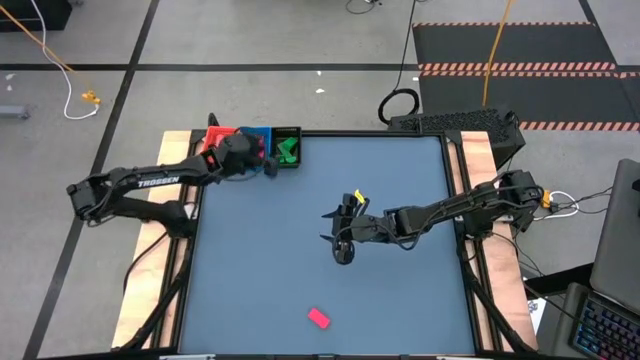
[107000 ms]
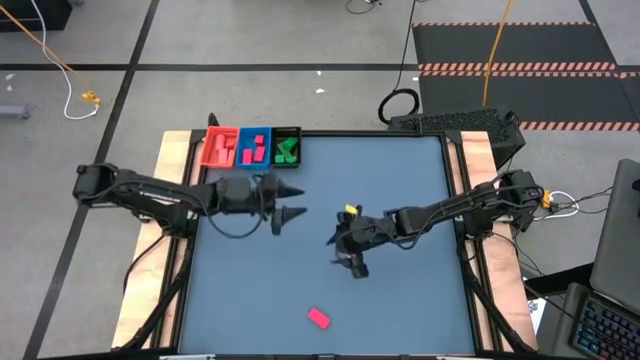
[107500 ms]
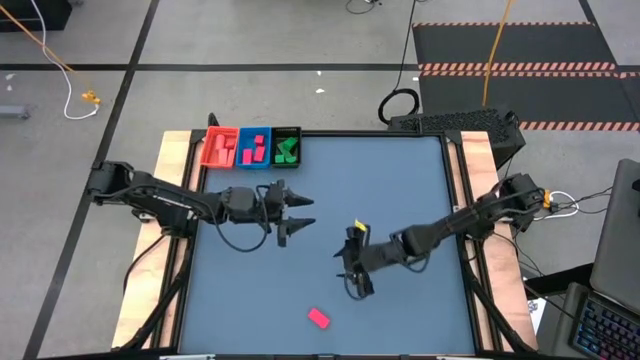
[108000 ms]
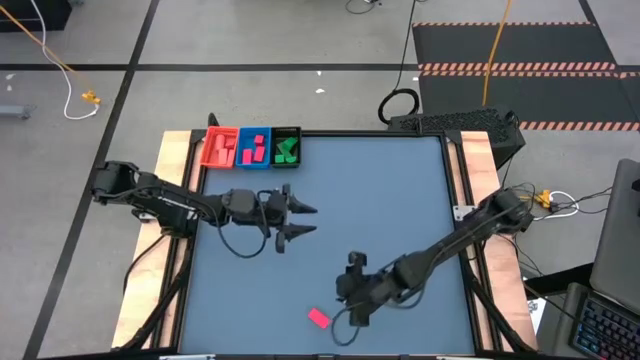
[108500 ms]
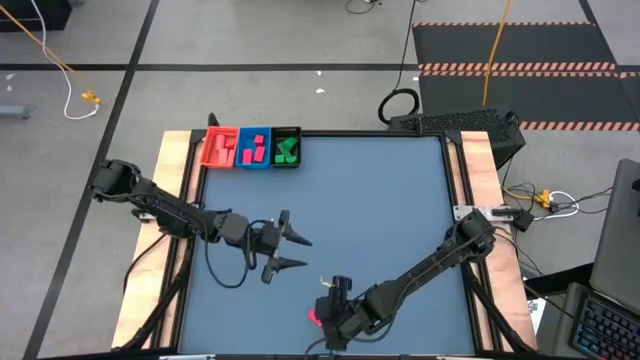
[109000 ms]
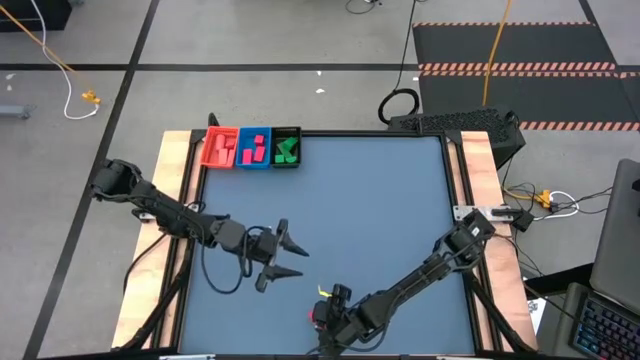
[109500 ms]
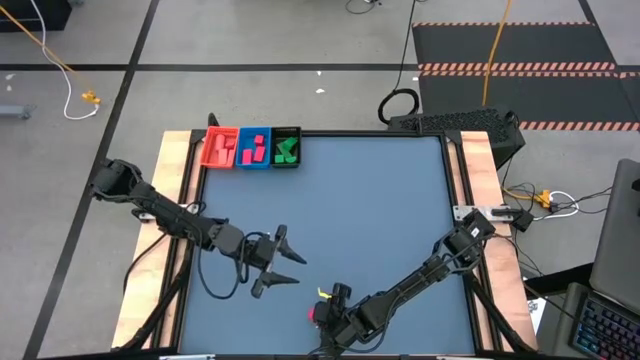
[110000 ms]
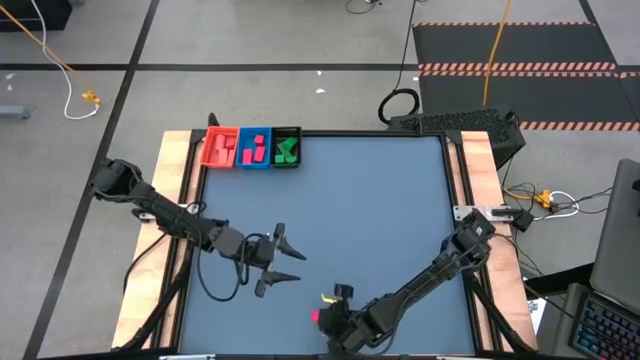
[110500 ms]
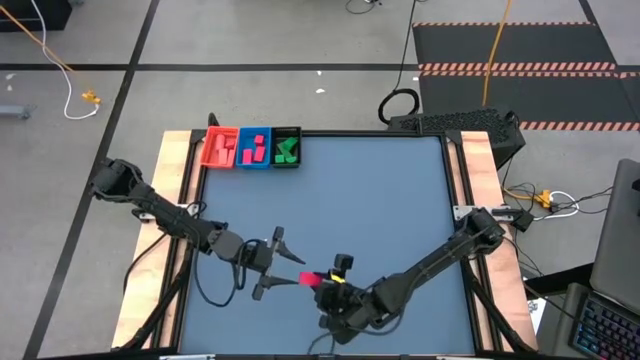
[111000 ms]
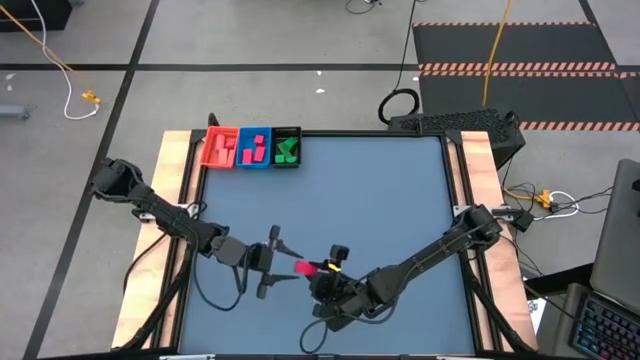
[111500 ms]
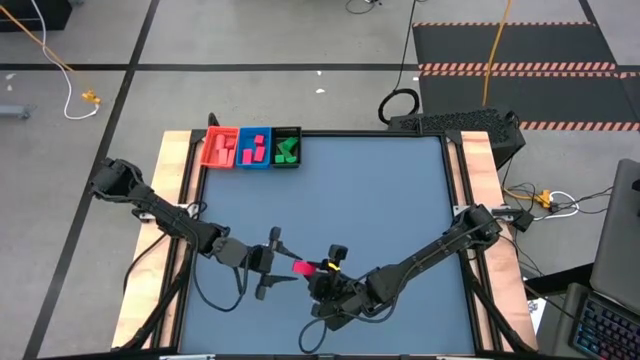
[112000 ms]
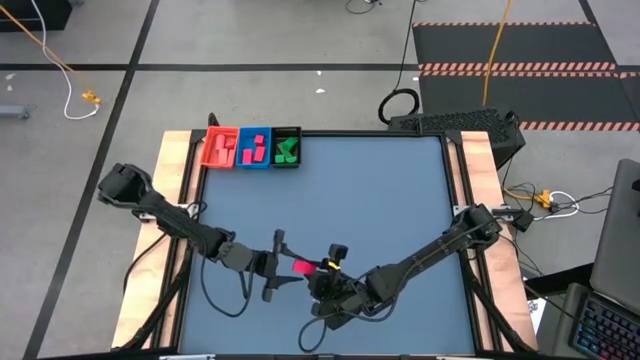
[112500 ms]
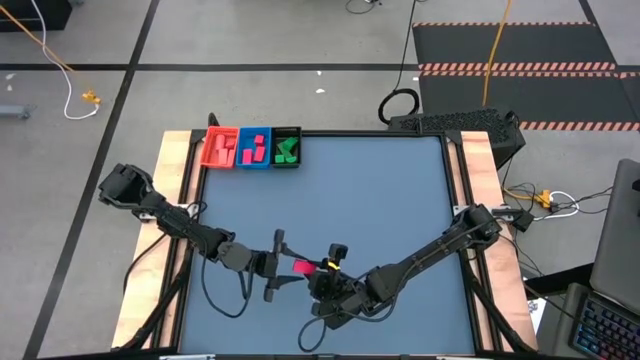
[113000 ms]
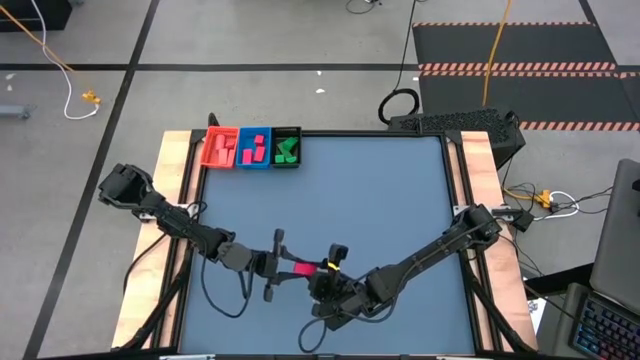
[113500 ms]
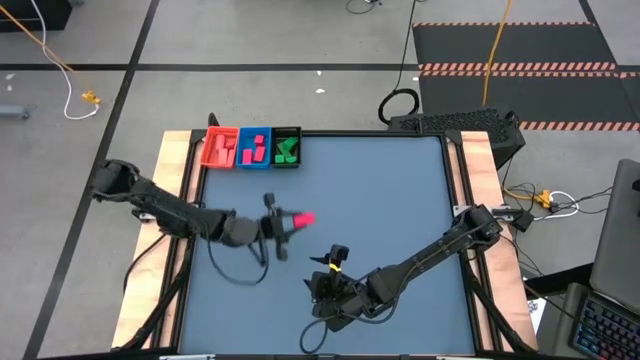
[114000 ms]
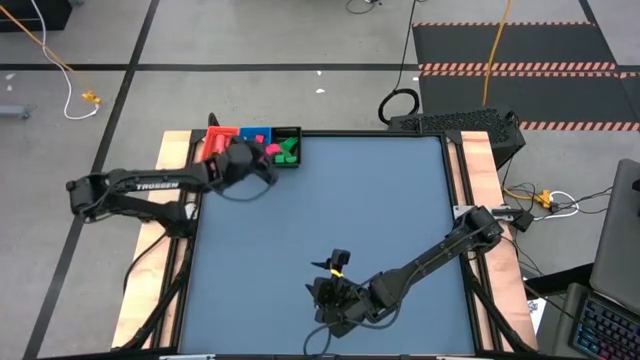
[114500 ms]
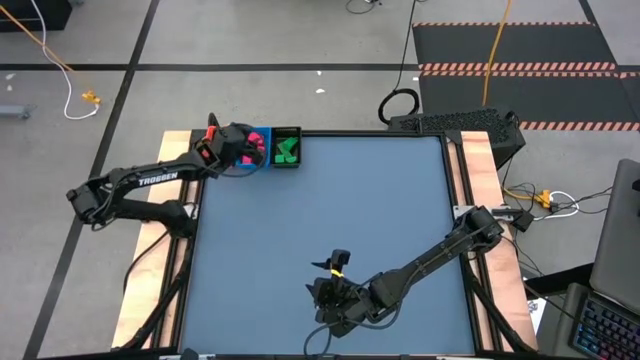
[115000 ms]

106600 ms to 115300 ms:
Task: Sort & place blocks by color
Put the red block into the blue bin

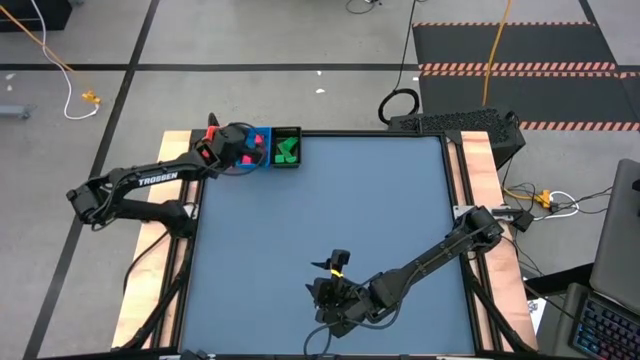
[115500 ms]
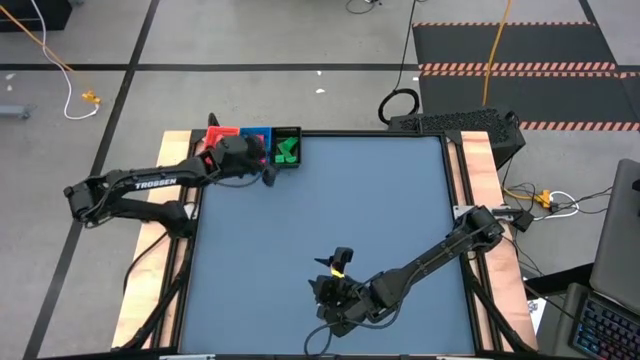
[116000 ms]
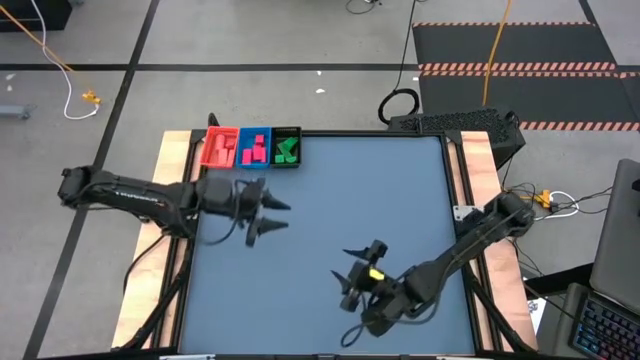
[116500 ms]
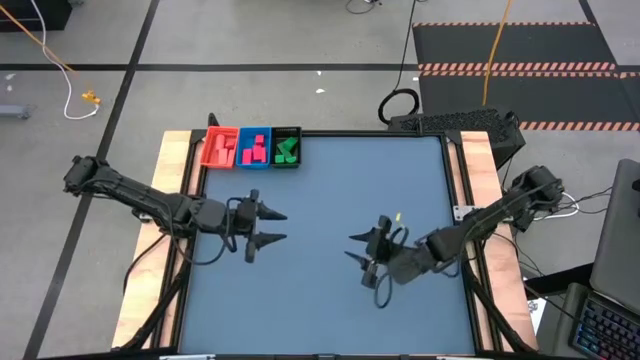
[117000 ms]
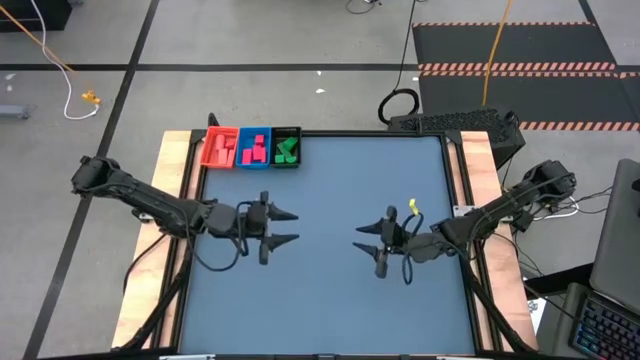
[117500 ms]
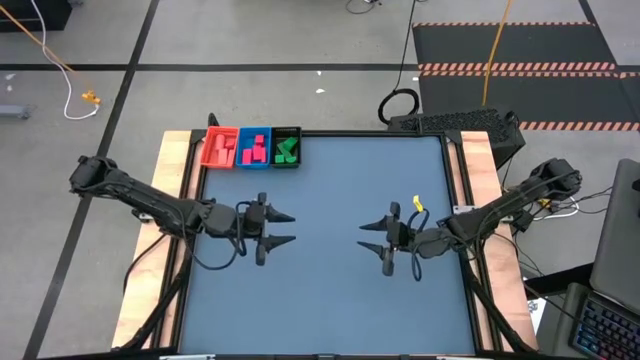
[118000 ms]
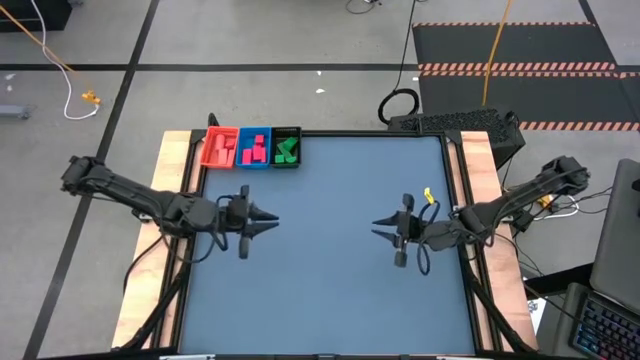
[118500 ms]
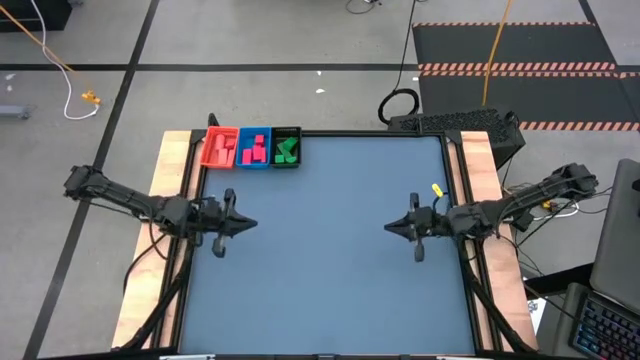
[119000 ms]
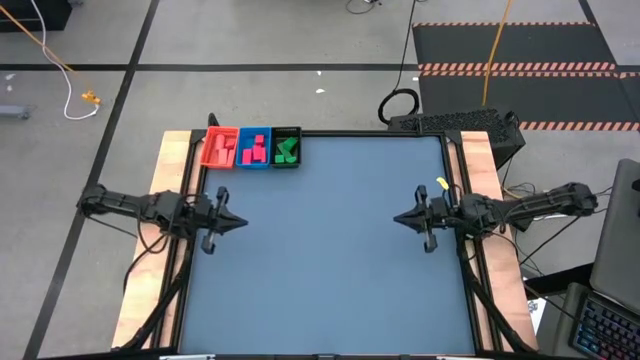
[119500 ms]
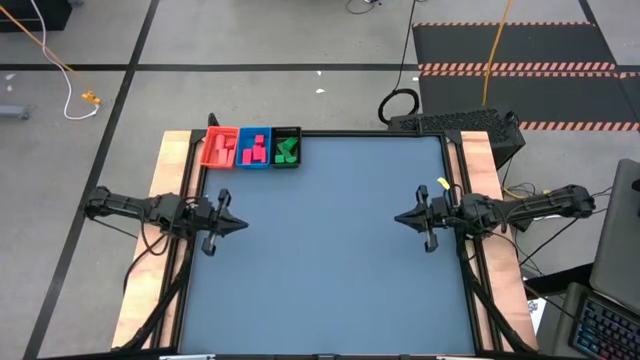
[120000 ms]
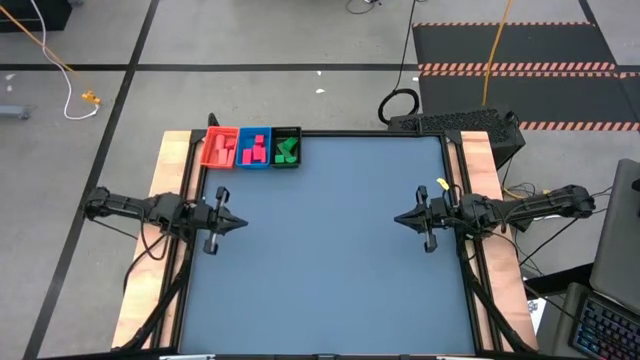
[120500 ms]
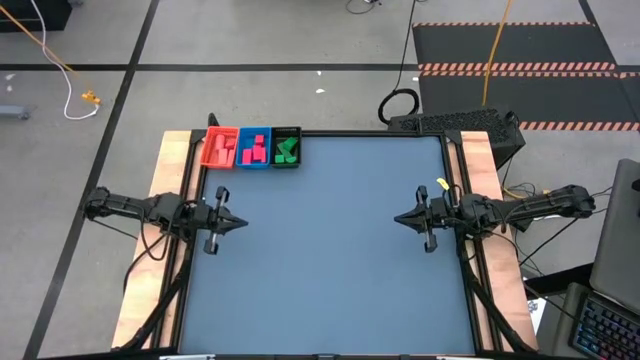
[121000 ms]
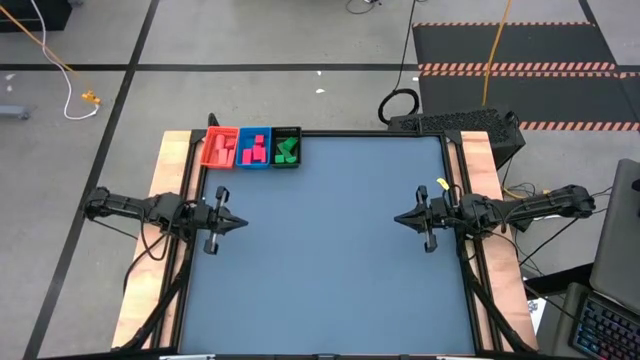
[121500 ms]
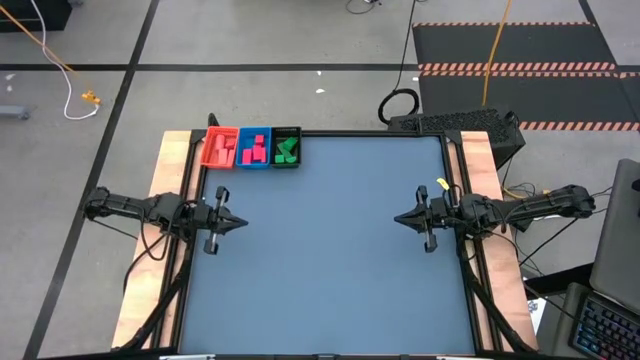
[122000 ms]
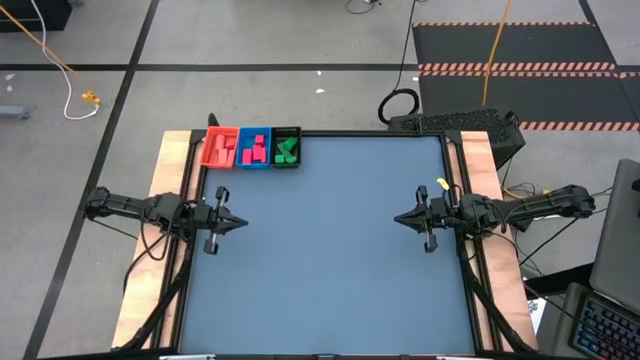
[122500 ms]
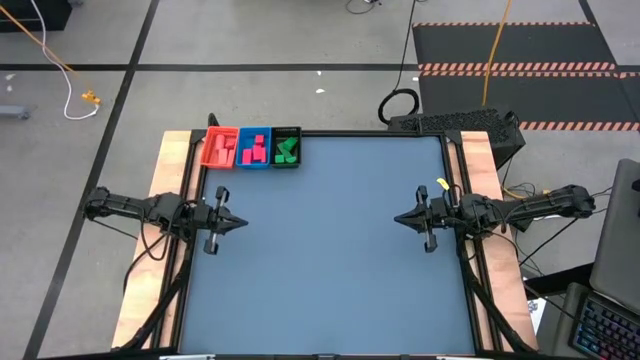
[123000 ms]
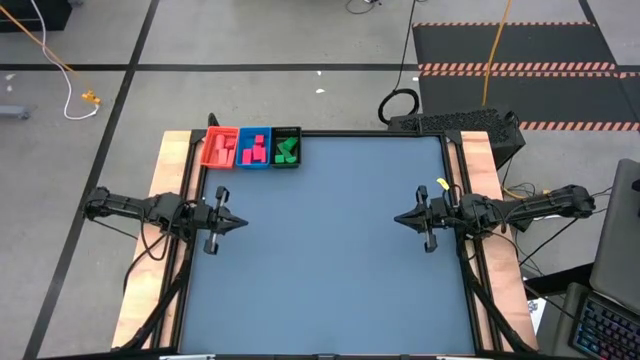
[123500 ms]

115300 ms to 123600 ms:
Return to Home Position

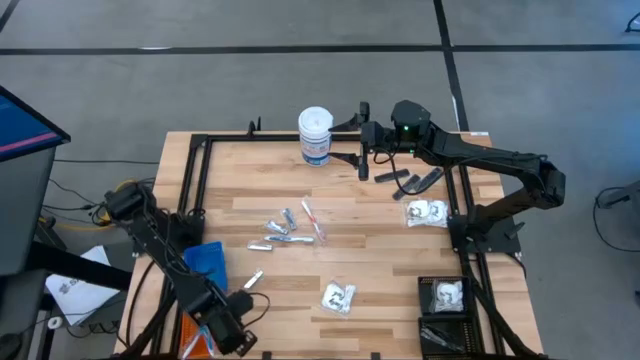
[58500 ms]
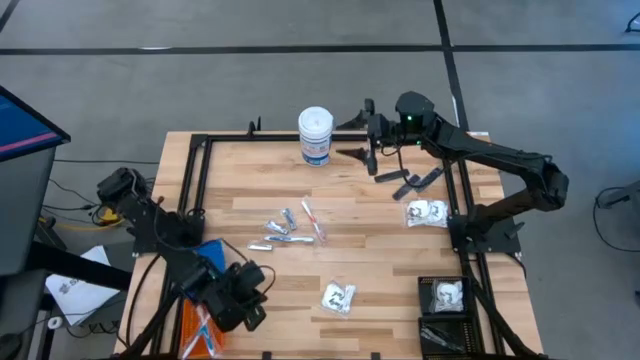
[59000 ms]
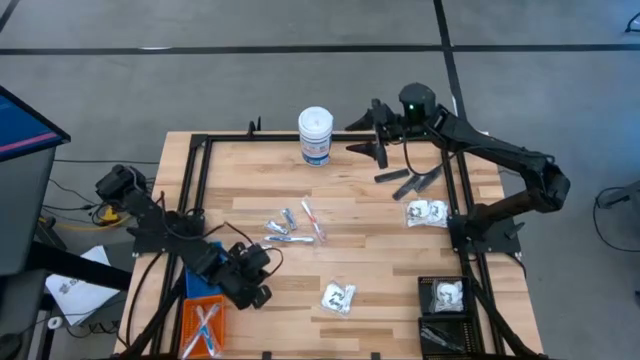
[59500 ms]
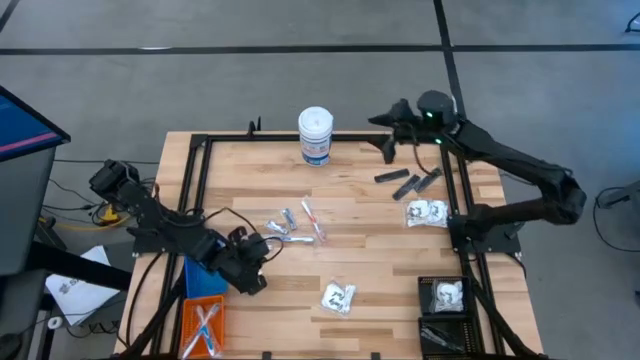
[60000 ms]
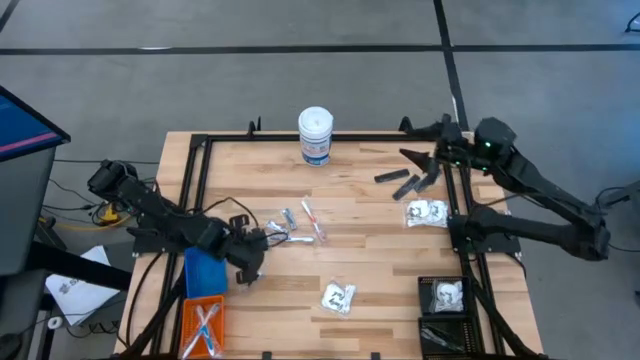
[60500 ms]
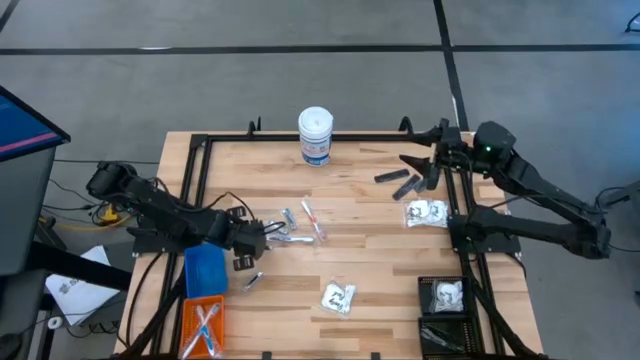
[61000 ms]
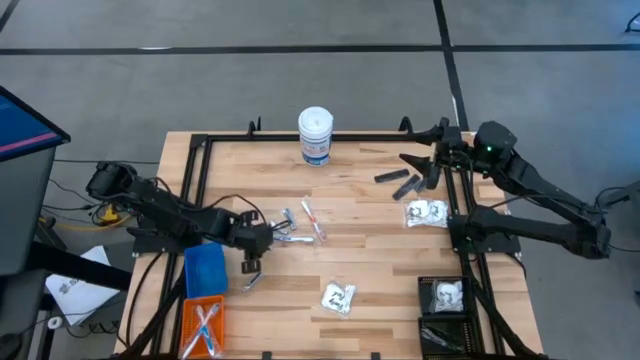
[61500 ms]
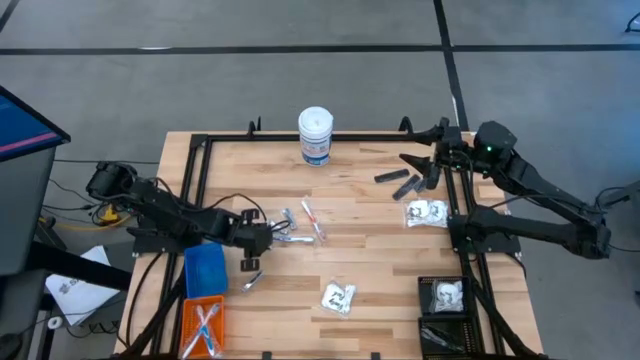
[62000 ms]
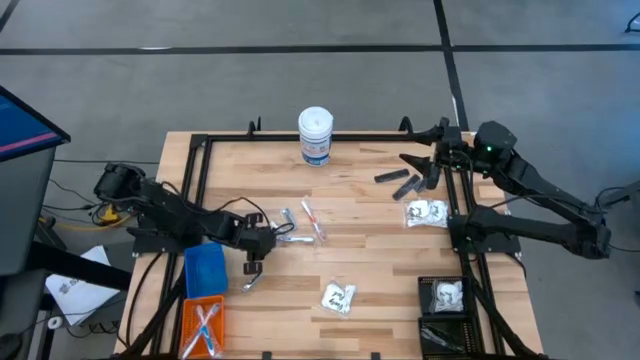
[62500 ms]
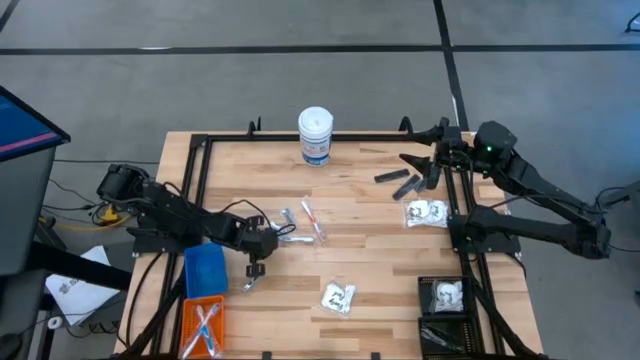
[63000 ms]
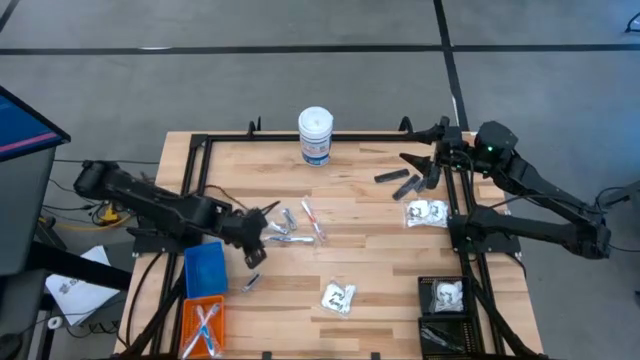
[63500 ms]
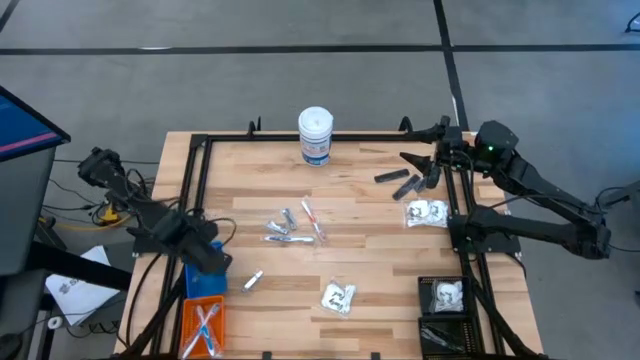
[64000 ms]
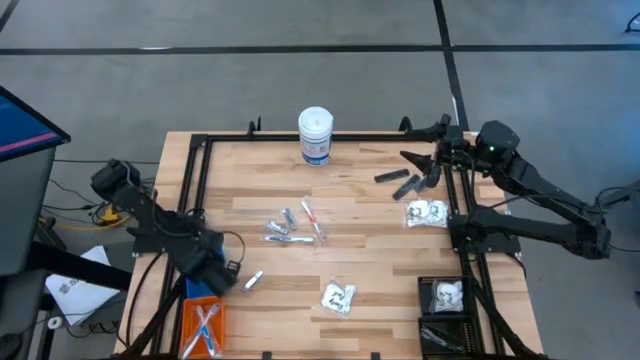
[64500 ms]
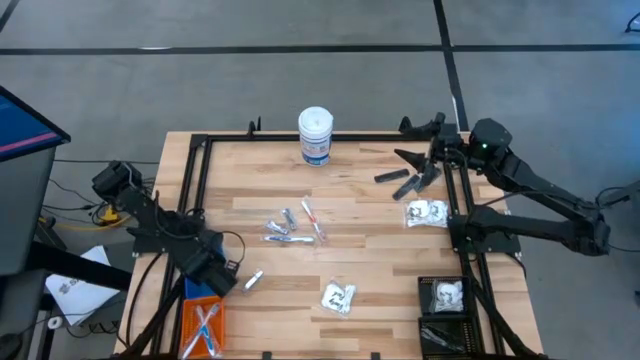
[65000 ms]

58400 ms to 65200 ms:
Task: Pick & Place Travel size toiletries
Put the silver nail clipper into the blue bin
